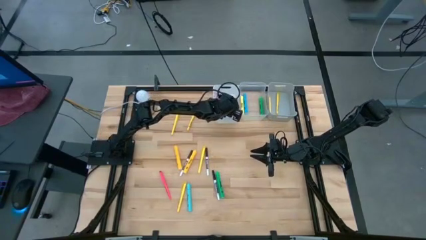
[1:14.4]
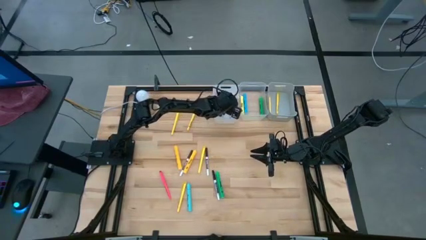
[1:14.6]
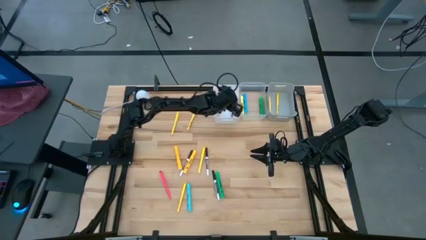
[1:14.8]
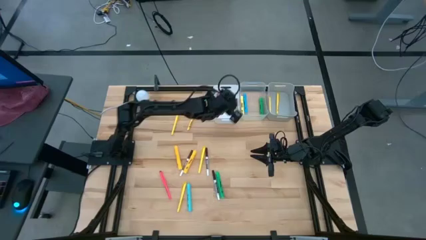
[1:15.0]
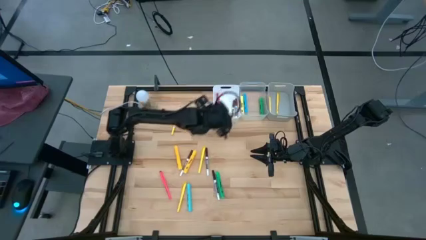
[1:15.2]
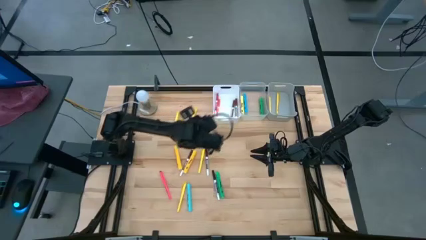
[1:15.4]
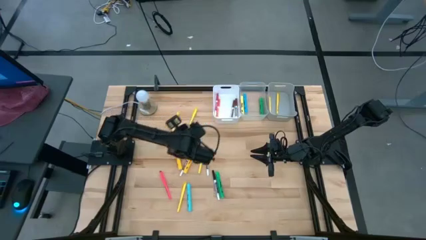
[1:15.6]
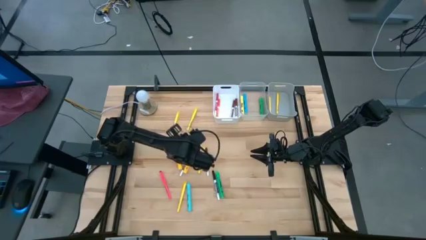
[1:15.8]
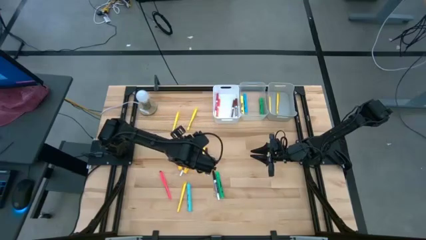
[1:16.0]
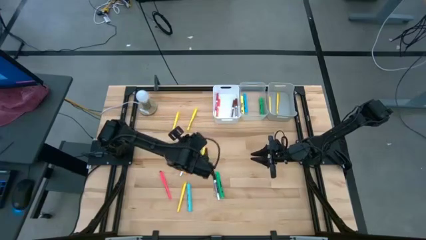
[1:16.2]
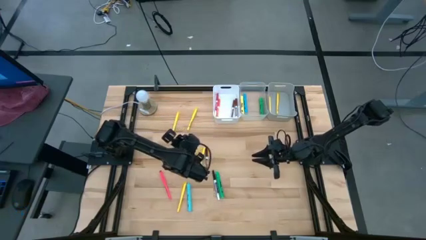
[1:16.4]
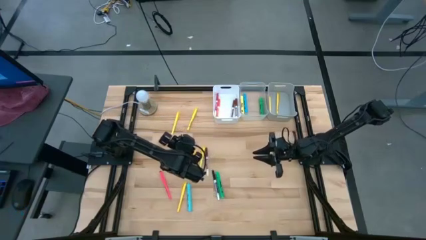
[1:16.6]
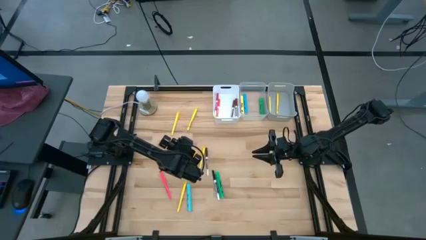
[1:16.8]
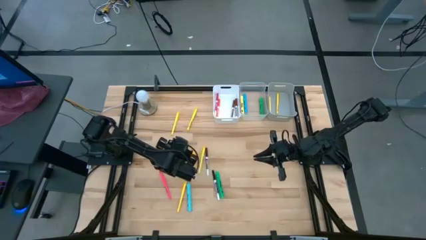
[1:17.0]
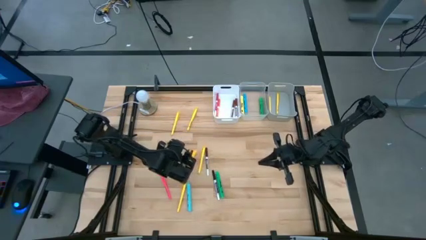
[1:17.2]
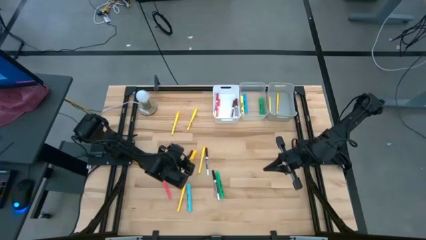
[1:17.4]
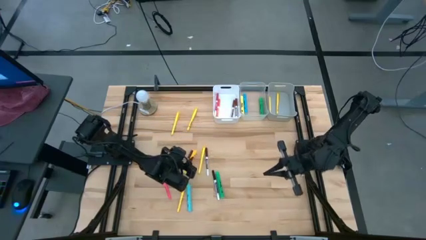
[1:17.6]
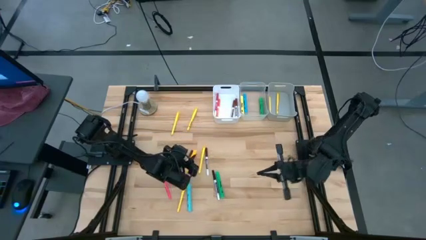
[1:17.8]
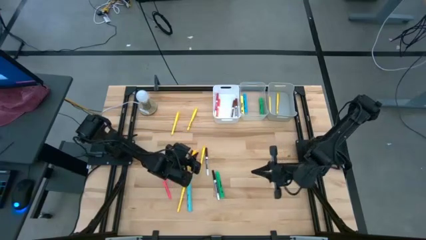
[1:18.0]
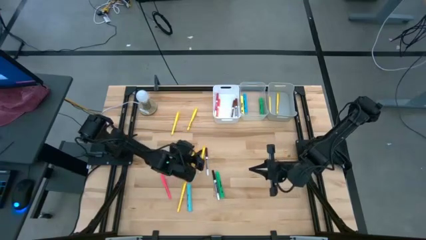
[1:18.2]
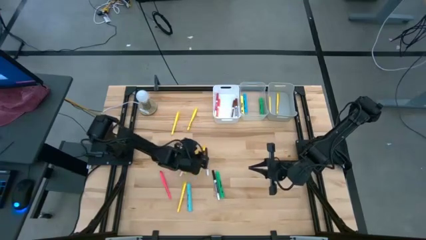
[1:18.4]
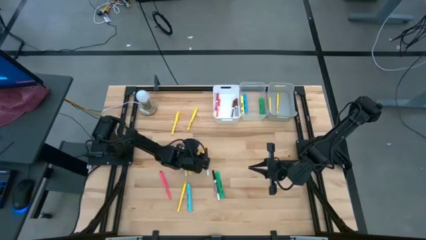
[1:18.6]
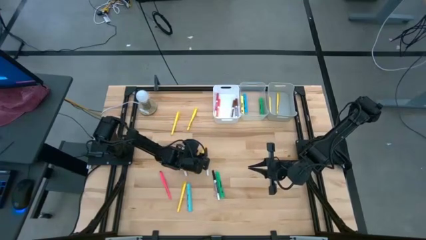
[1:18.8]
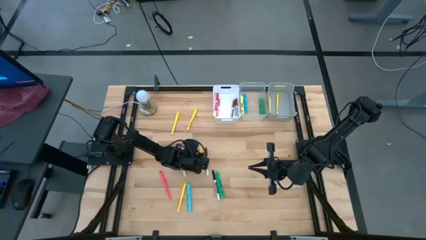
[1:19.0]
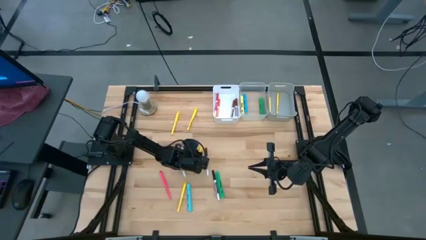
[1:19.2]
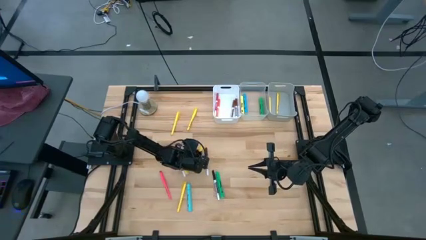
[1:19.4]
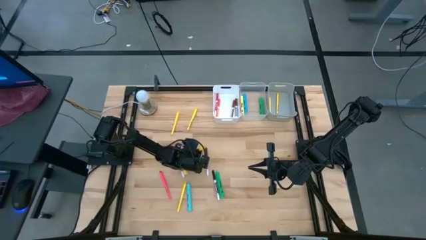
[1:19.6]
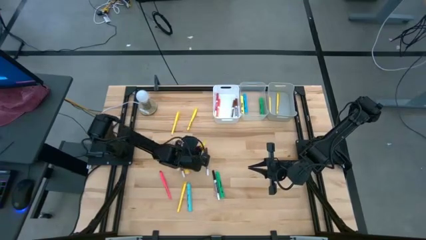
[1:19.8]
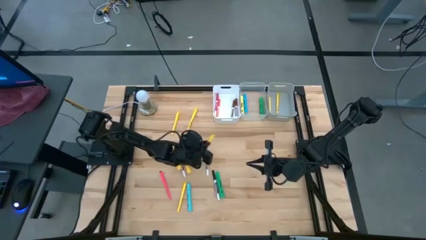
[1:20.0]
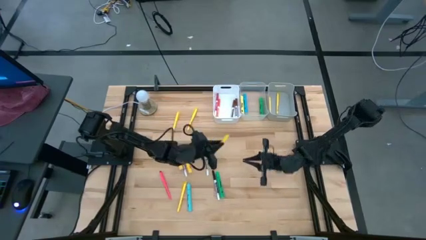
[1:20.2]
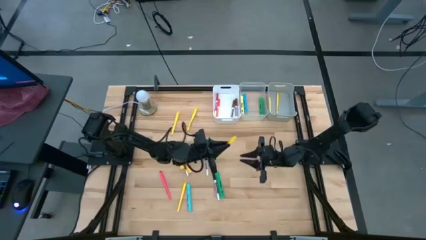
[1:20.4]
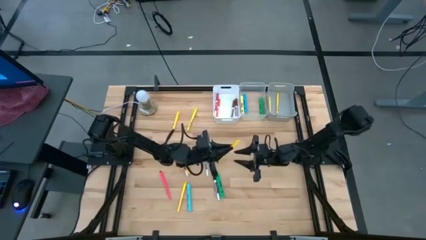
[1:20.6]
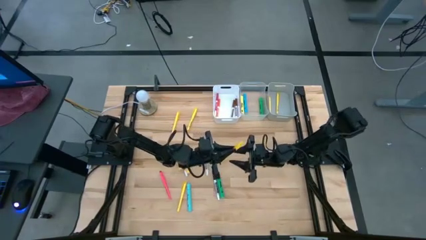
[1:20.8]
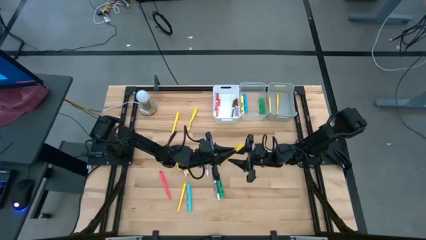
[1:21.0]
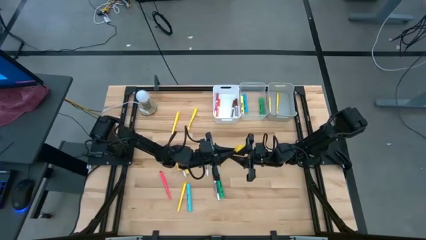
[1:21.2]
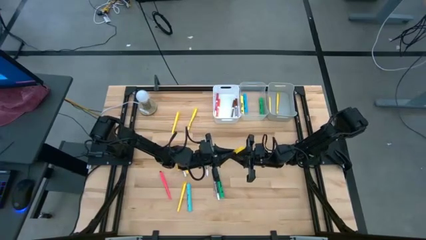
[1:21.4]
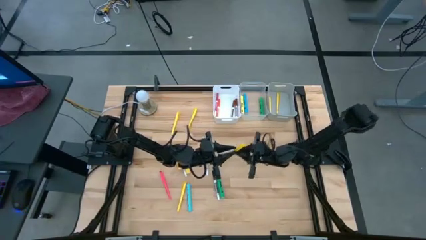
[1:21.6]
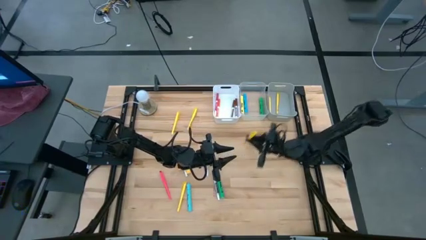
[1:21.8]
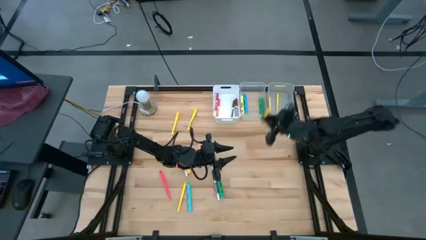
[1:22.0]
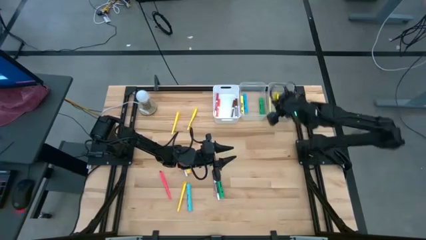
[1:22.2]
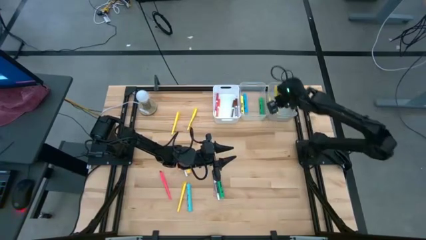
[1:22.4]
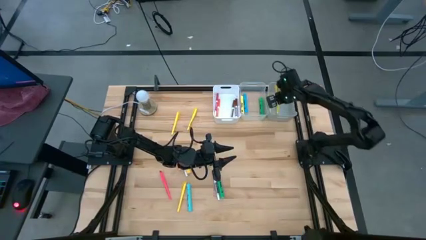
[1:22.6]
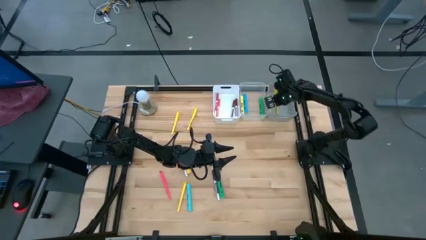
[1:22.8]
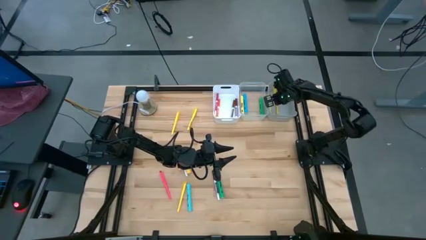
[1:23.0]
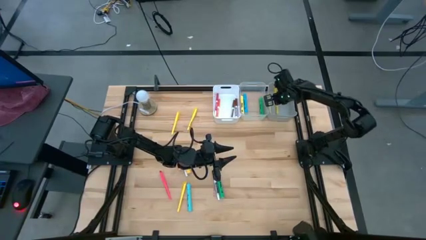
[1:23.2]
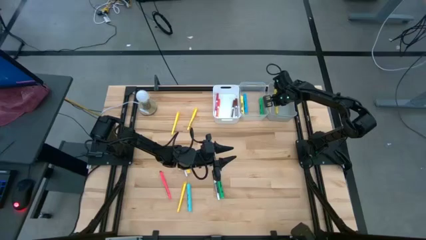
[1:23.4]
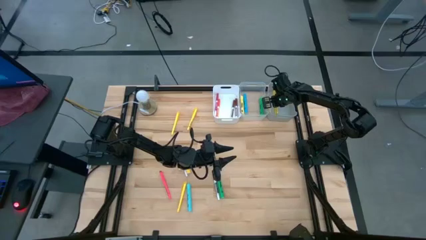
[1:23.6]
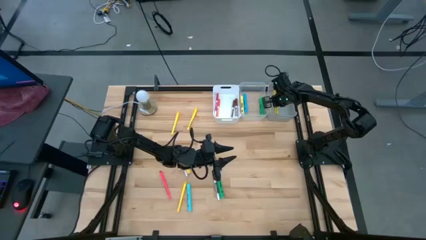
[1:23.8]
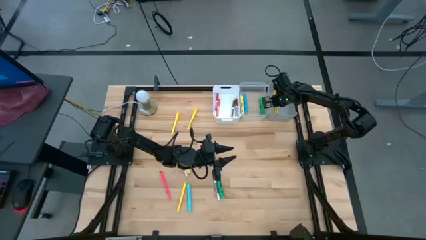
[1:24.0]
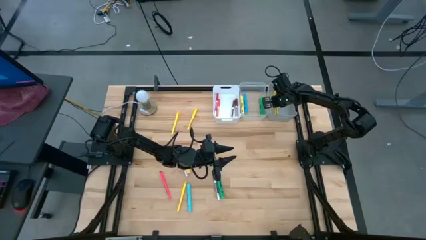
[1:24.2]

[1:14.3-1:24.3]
Task: Pick & Place Markers
Put the yellow pen into the gray bin

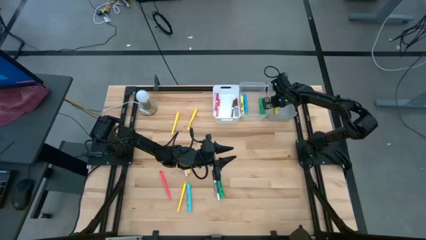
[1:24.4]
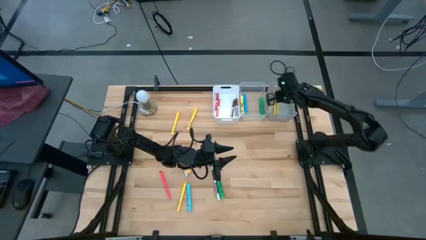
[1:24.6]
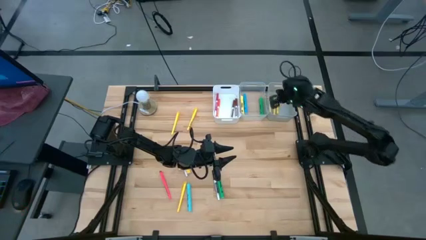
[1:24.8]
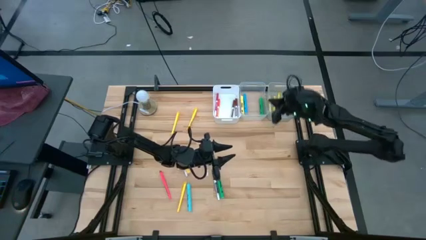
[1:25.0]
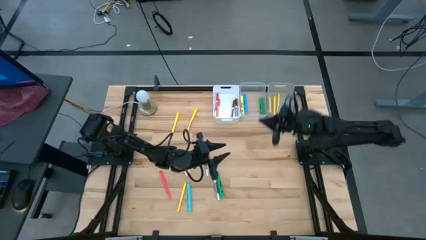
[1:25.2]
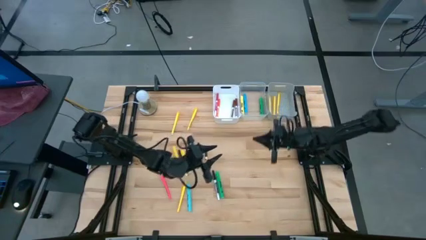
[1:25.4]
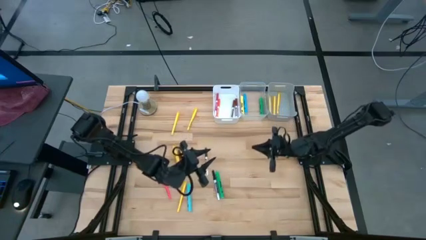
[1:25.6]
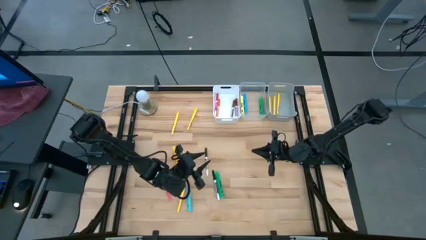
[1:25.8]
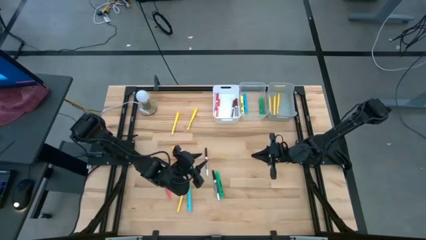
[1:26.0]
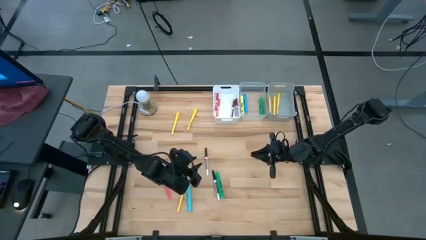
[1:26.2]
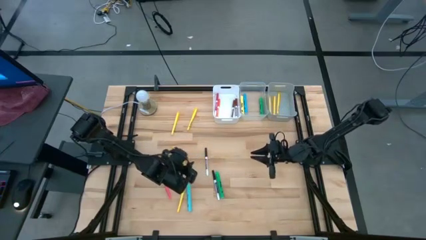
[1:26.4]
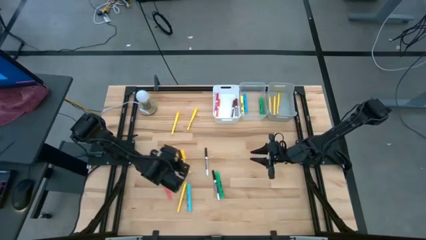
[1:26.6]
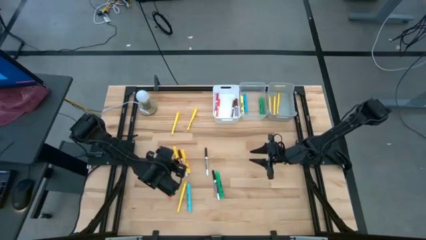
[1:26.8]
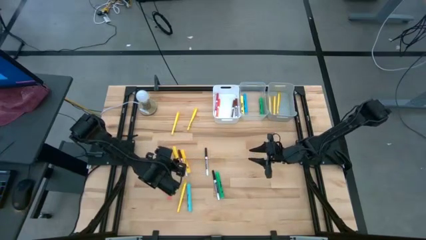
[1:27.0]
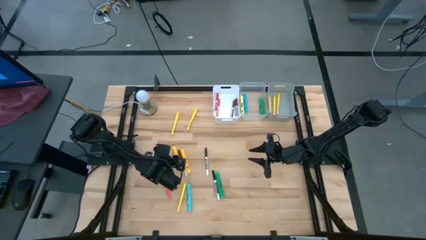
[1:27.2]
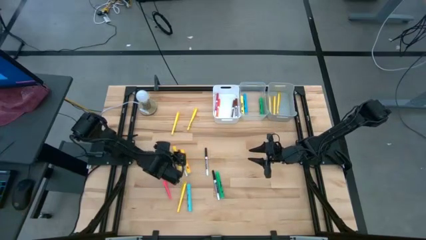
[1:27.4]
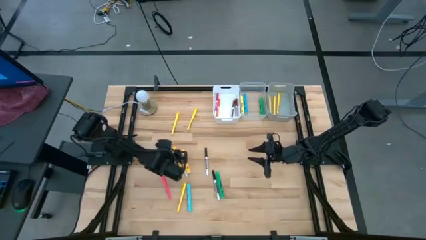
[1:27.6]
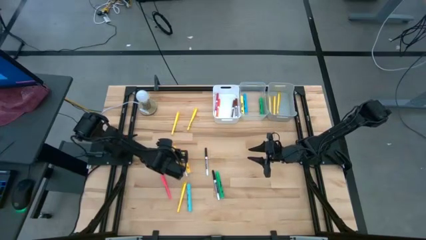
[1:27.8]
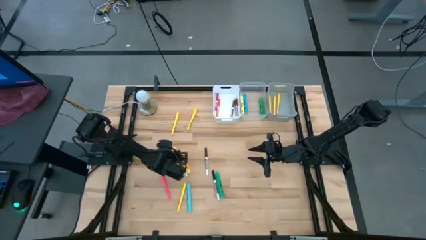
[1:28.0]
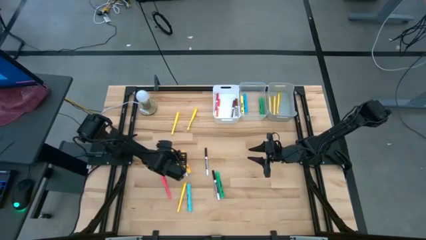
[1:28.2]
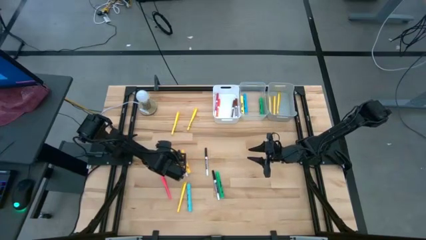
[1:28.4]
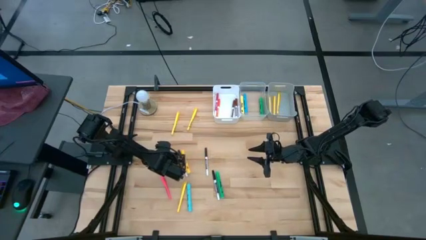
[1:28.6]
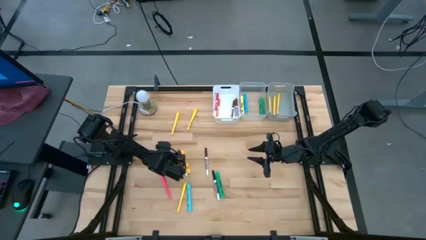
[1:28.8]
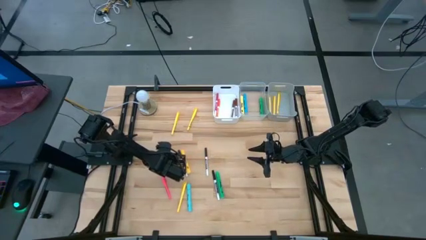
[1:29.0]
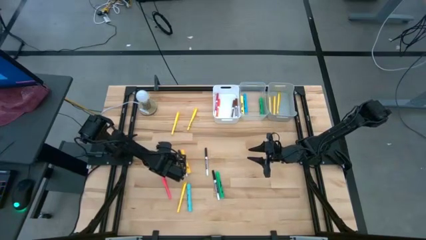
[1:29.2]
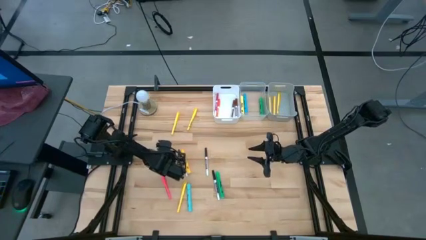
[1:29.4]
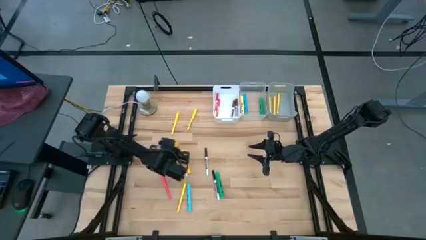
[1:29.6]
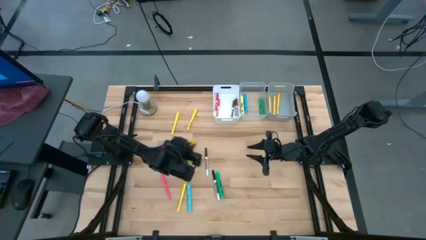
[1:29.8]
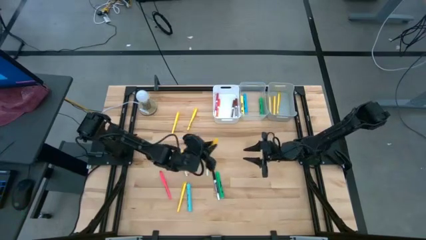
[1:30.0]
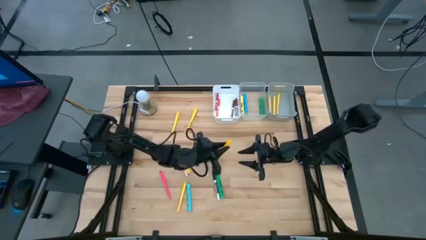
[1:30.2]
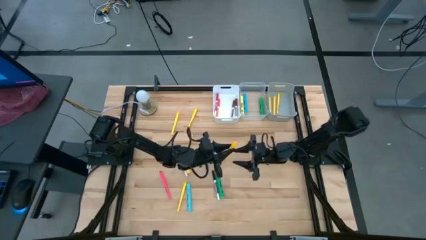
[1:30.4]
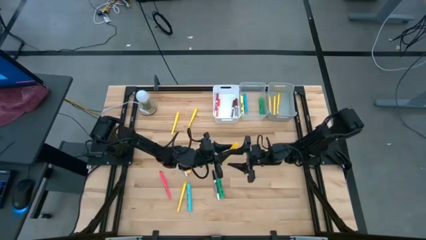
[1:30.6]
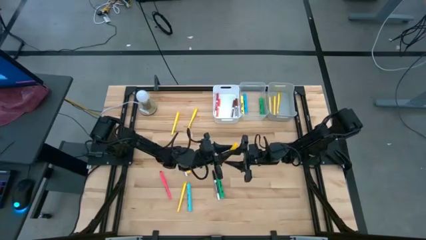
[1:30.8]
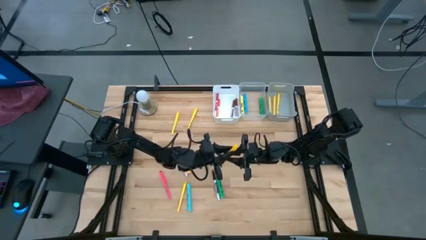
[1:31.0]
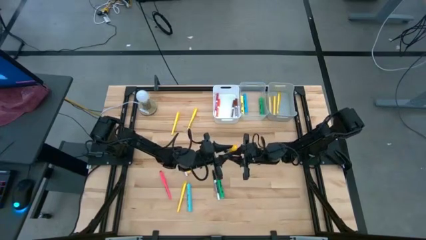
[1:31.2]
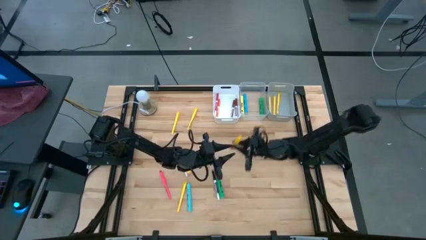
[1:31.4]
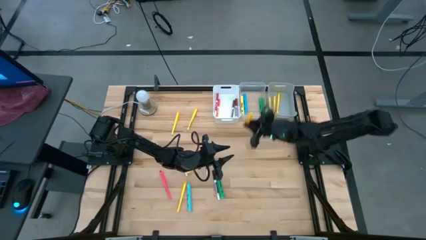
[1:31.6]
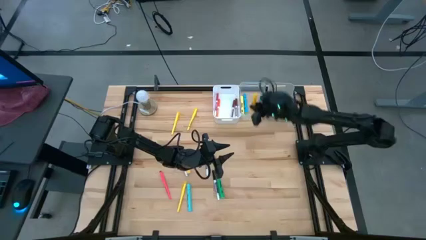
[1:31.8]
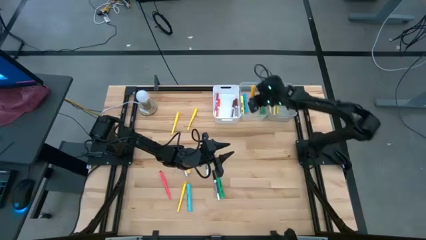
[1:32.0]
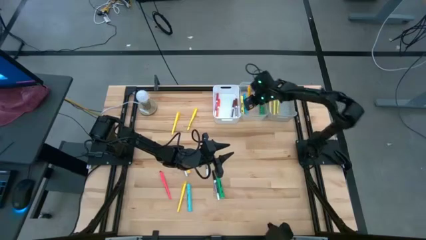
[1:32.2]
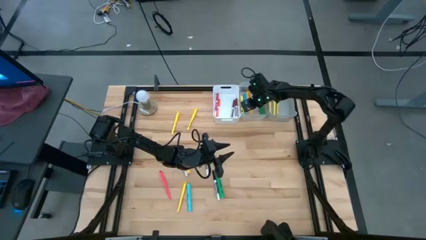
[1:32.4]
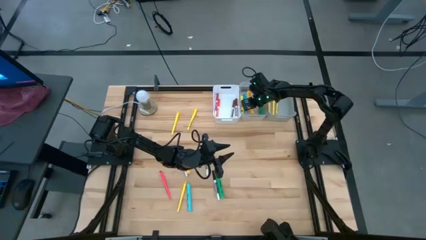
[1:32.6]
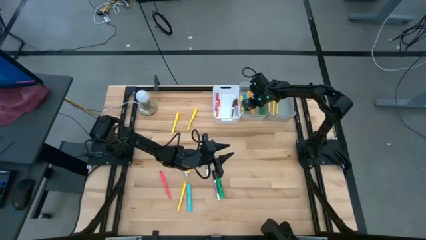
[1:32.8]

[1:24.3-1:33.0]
Put the left yellow highlighter pen into the transparent bin
